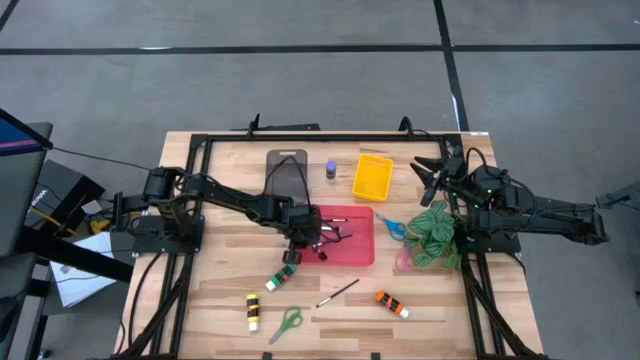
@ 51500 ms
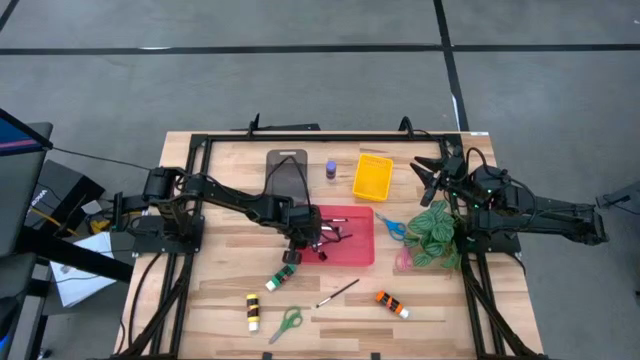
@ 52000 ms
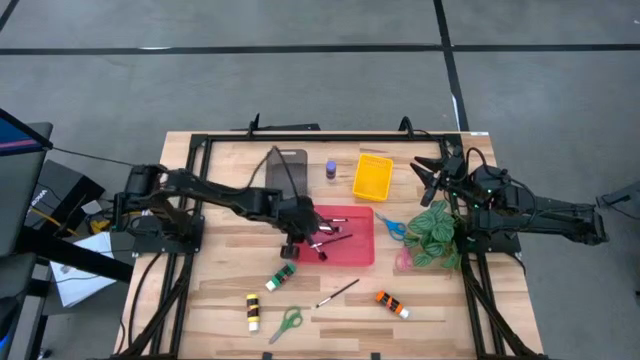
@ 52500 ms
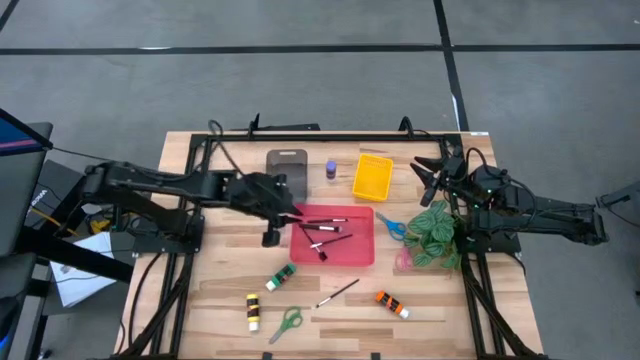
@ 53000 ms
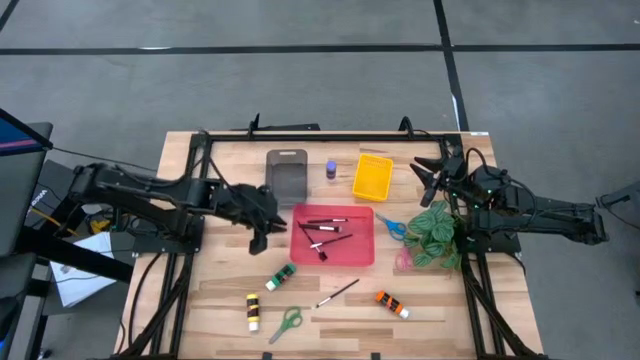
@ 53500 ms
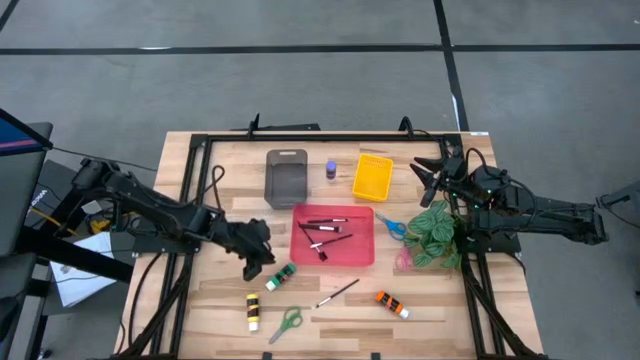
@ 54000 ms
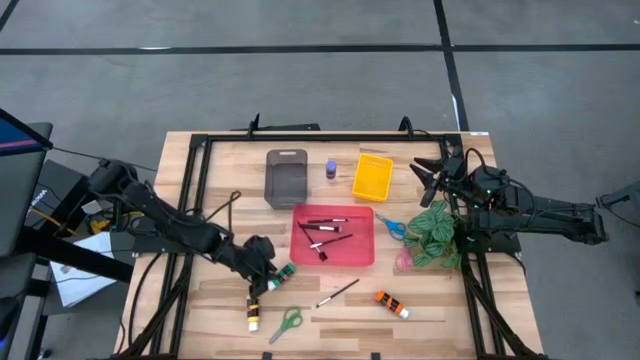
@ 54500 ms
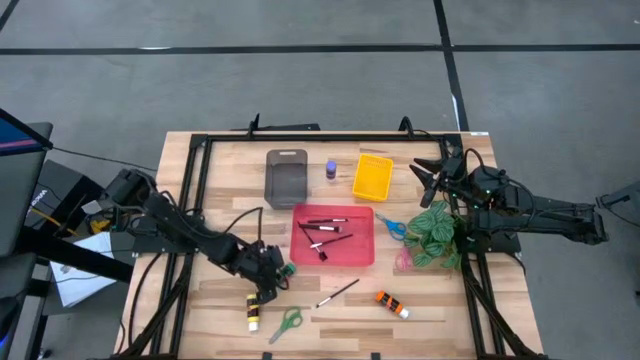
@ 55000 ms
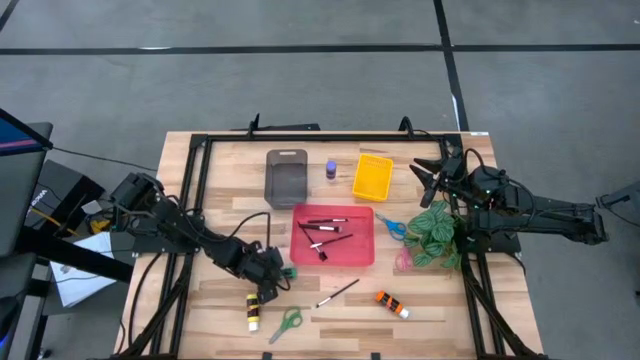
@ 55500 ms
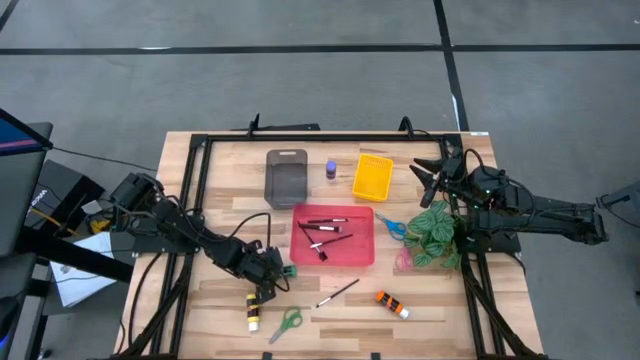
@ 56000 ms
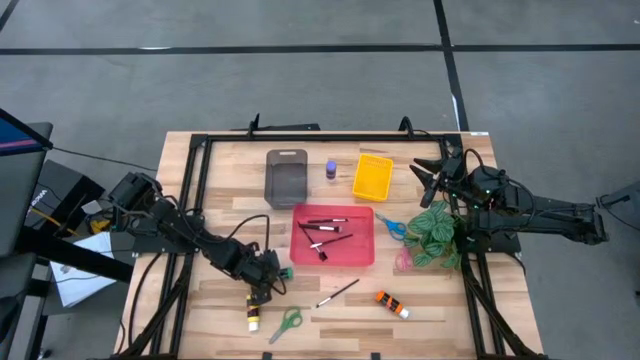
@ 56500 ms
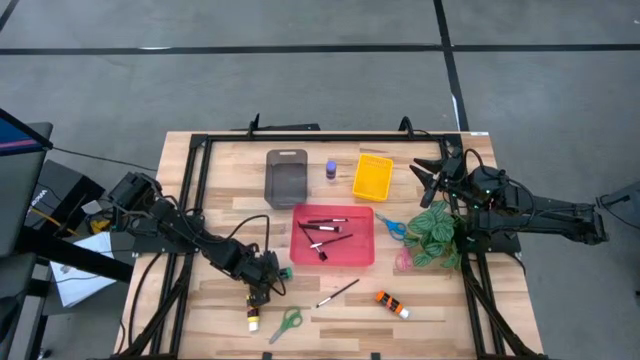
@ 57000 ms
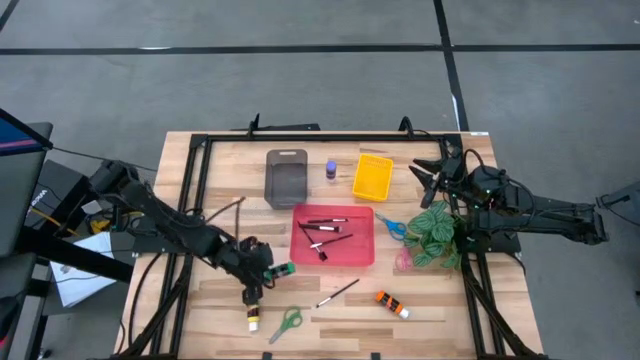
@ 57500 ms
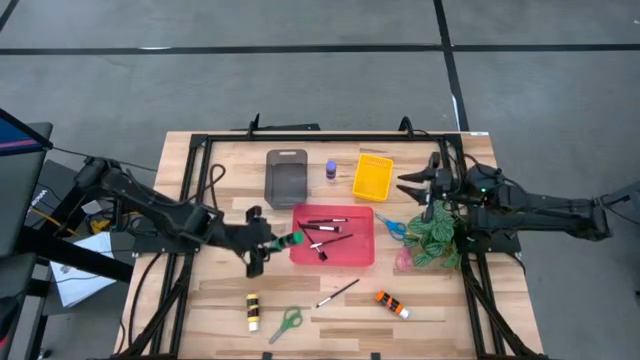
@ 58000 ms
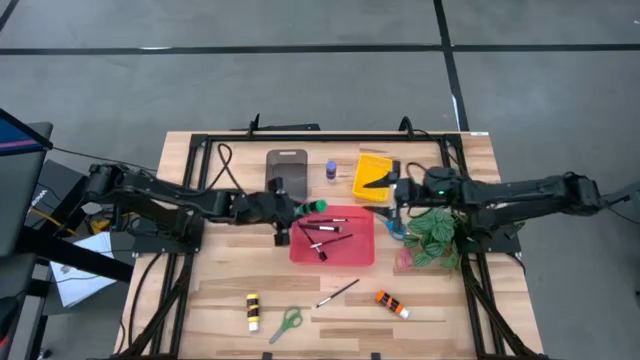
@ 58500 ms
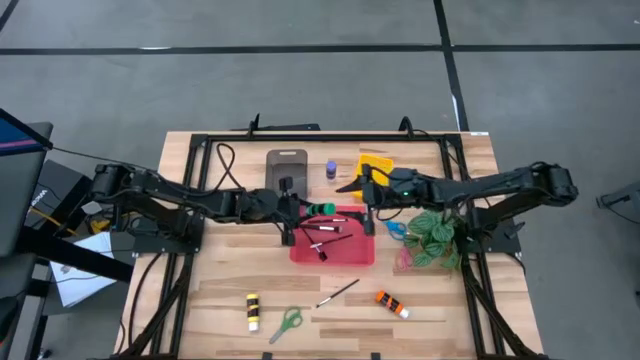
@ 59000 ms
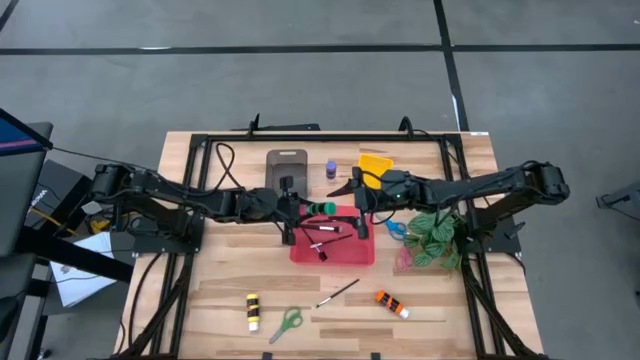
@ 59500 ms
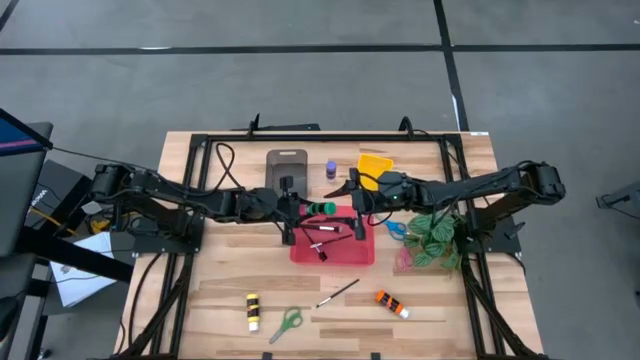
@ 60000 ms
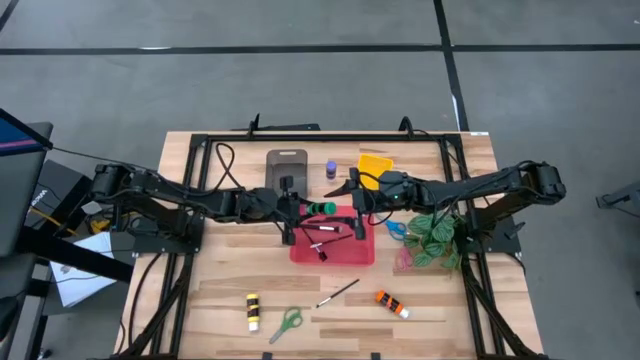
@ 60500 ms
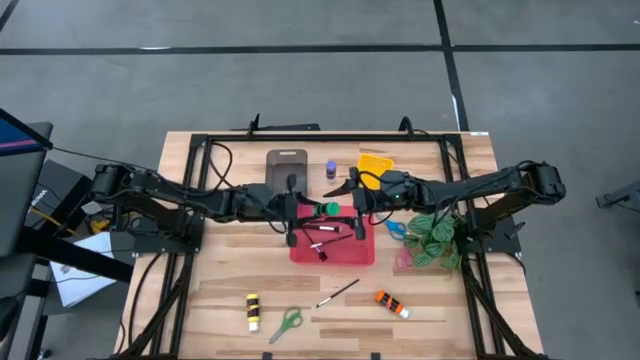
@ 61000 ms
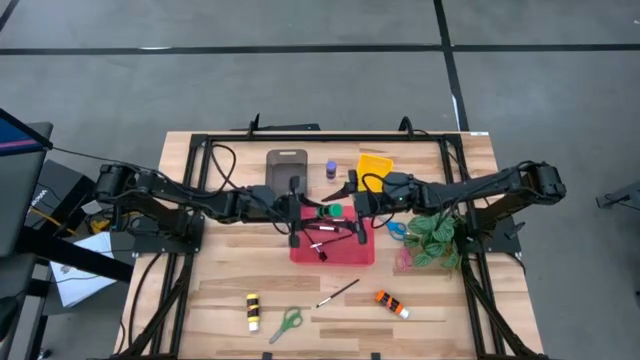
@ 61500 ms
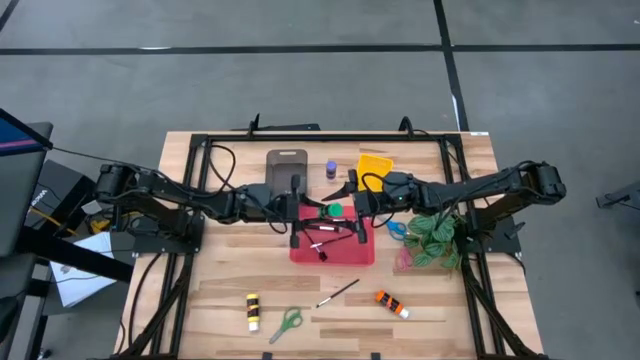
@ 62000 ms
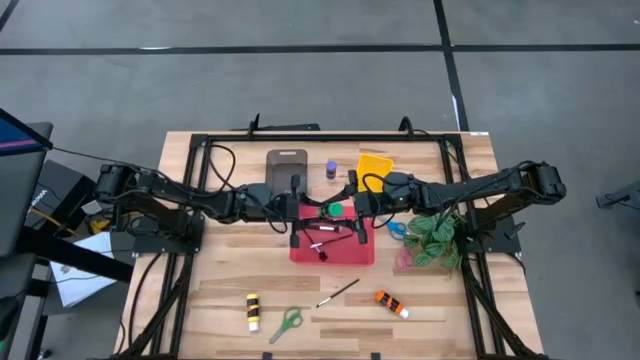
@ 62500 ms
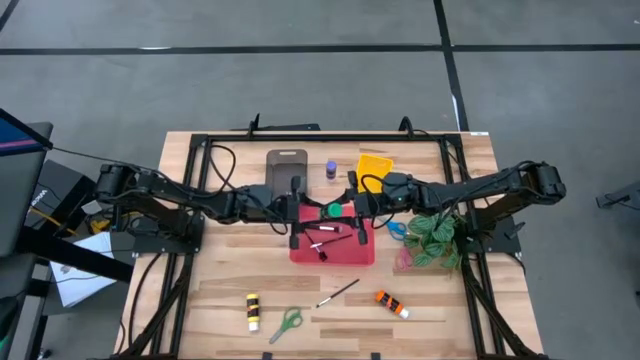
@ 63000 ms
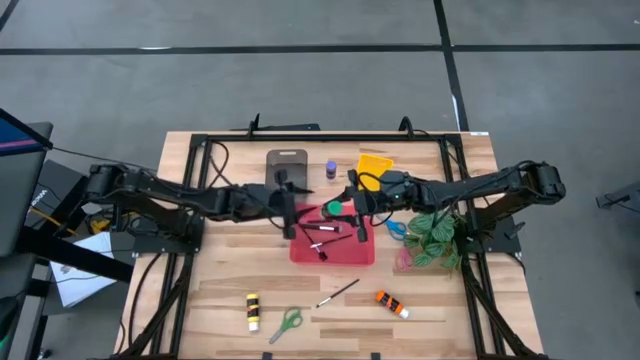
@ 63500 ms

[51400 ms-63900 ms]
Task: Pick & Place Paint Supplies
Put the green paint bottle into the yellow bin

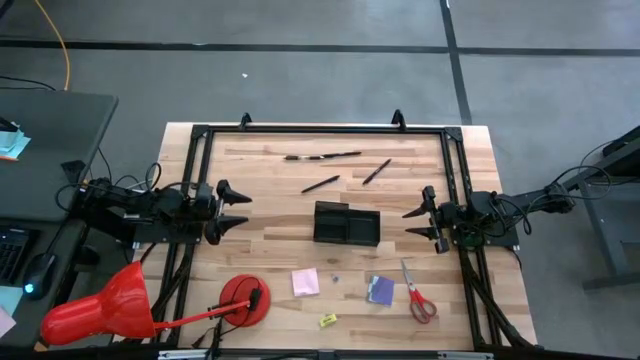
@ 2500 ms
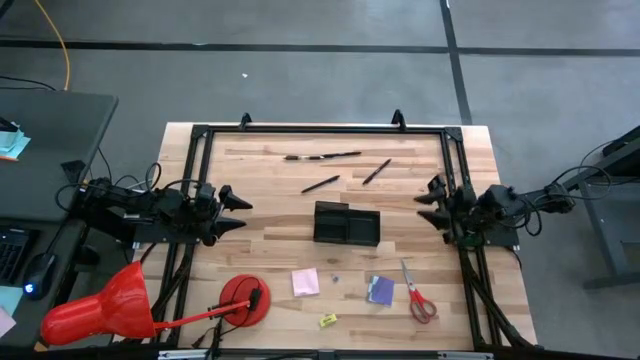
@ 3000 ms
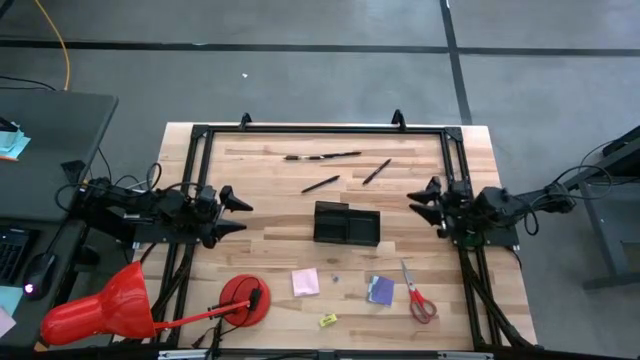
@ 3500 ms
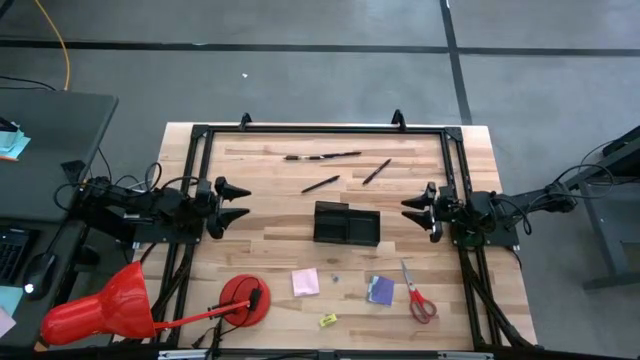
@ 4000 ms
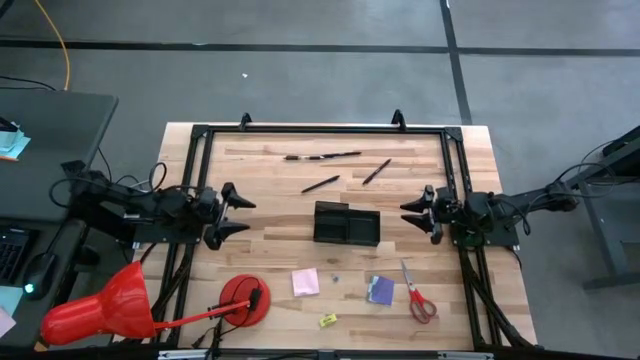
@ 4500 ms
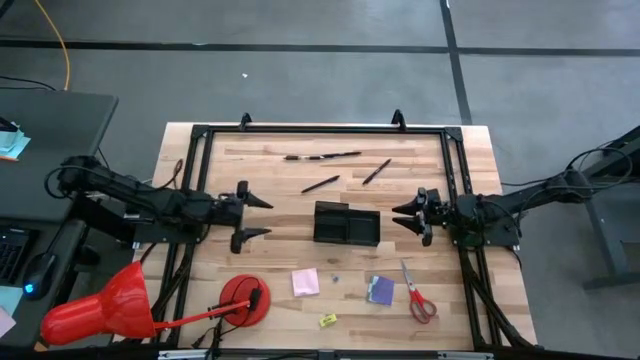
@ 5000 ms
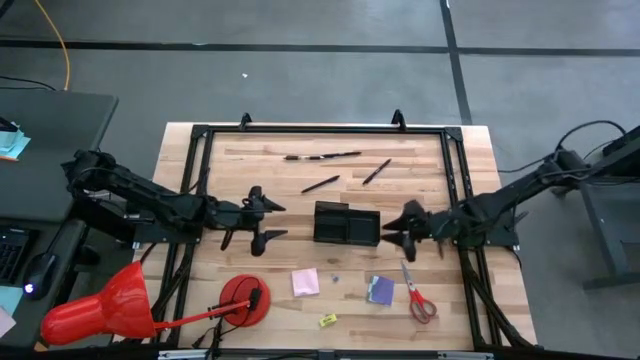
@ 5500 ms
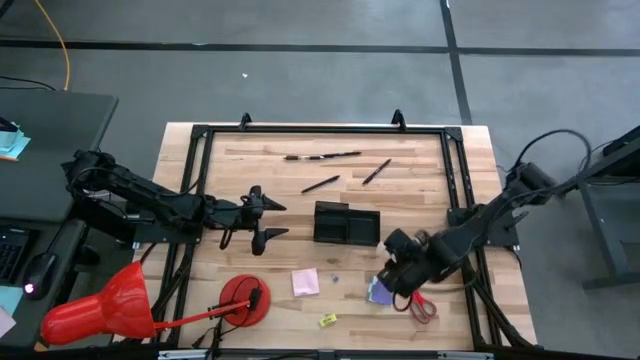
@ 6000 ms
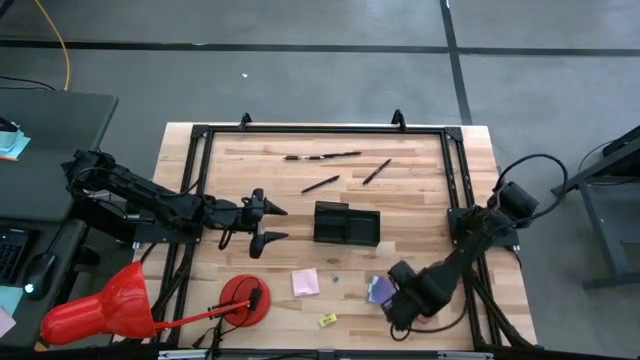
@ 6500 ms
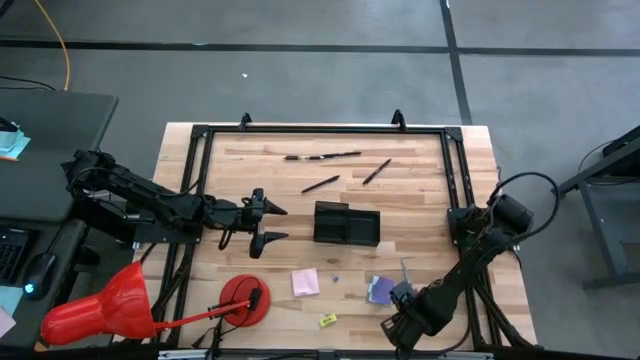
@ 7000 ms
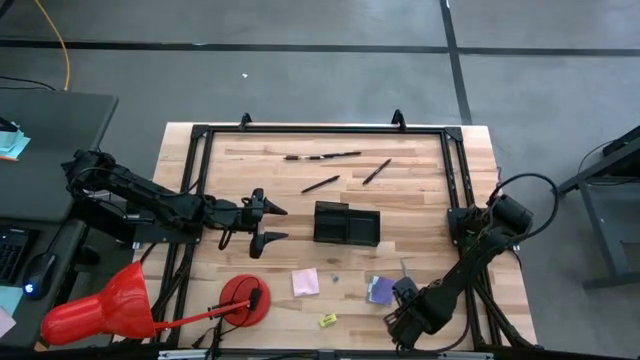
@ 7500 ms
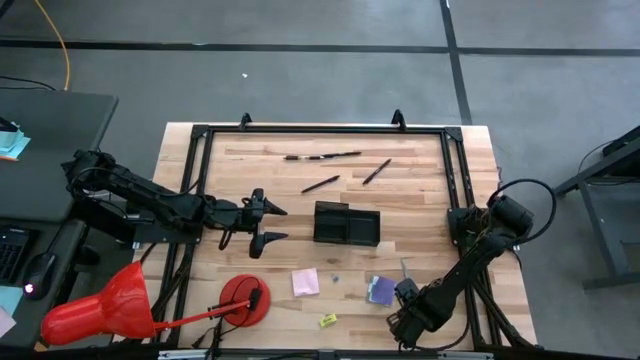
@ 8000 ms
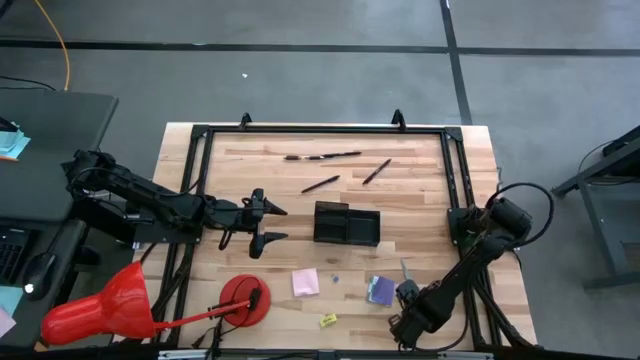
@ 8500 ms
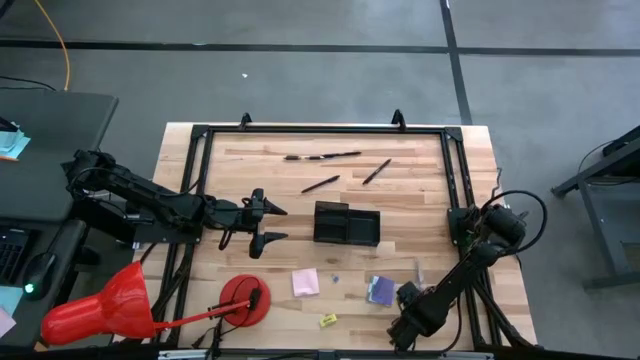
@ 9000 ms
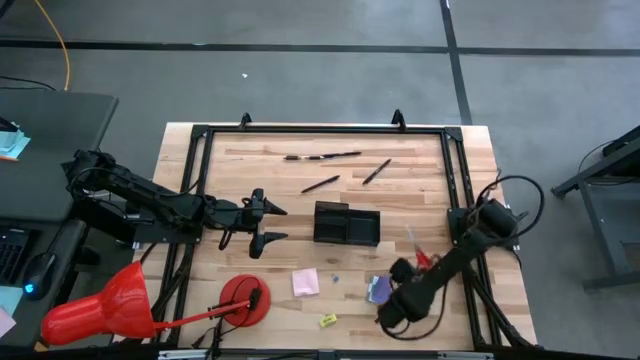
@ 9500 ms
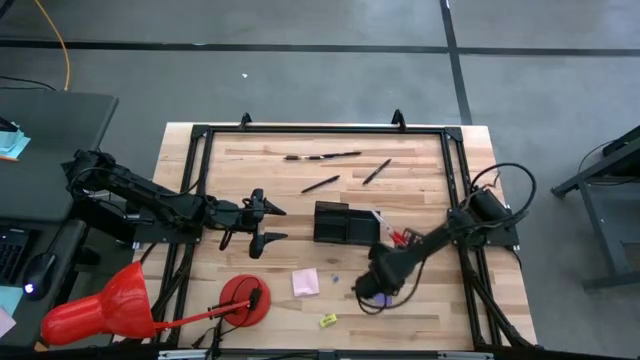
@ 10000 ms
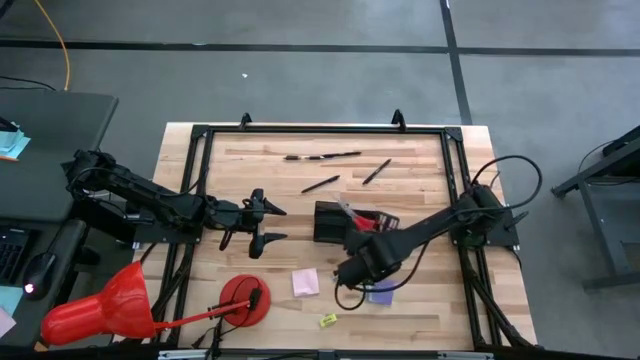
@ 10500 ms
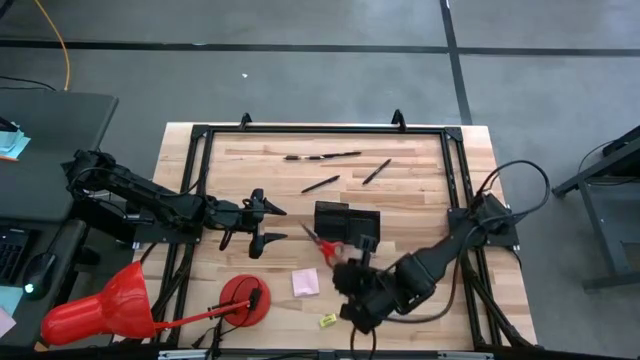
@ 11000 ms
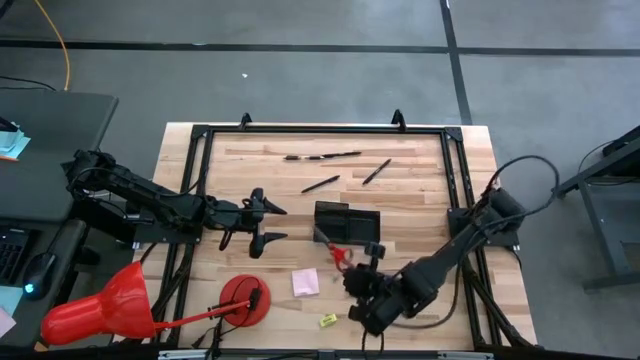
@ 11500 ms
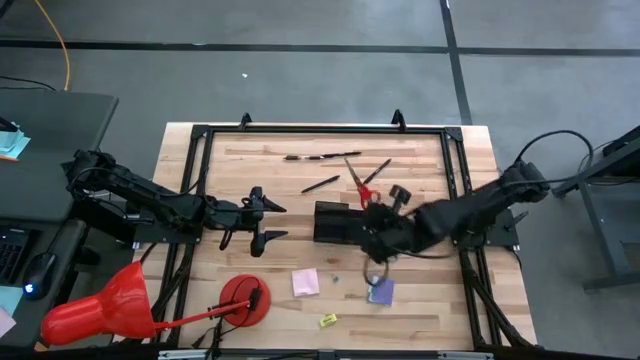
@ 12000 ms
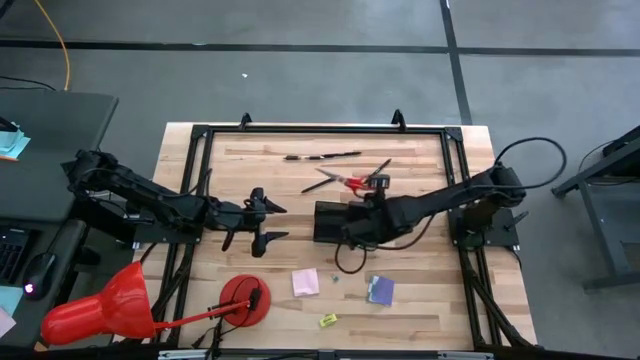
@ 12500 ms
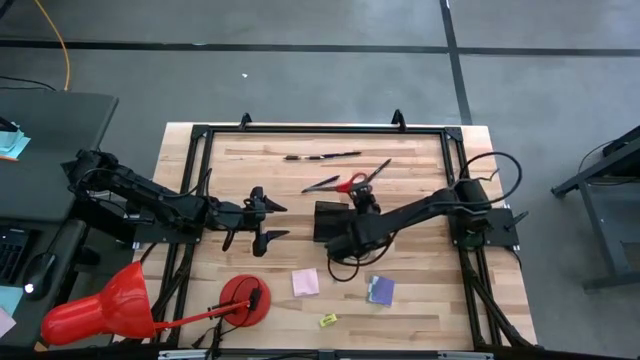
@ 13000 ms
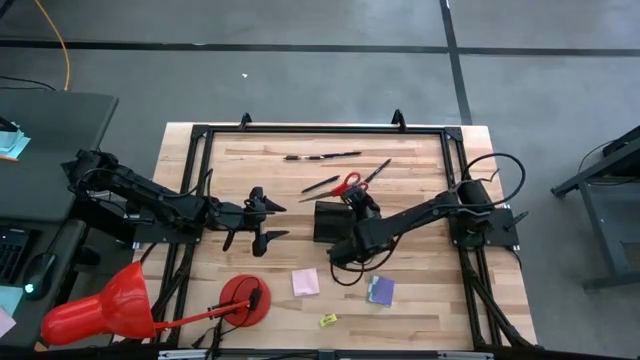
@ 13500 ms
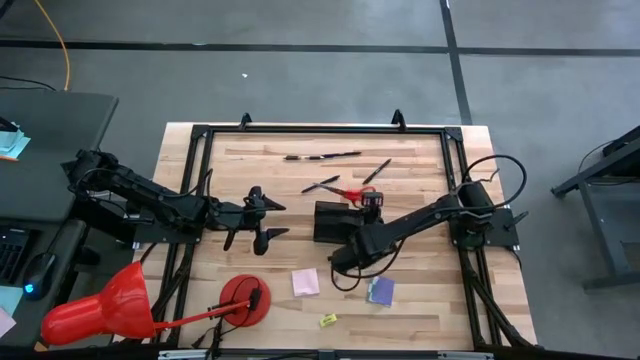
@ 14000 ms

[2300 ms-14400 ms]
Task: Pick and place office supplies into organizer
Put the red scissor into the black desk organizer
